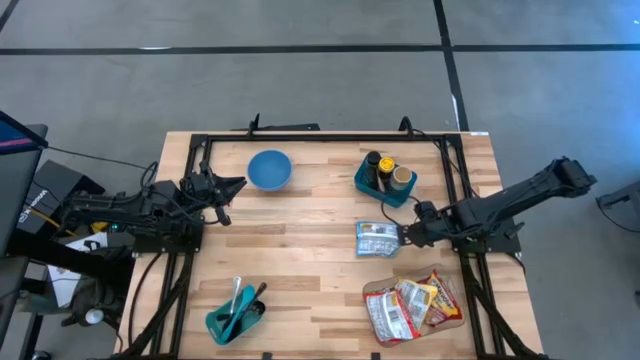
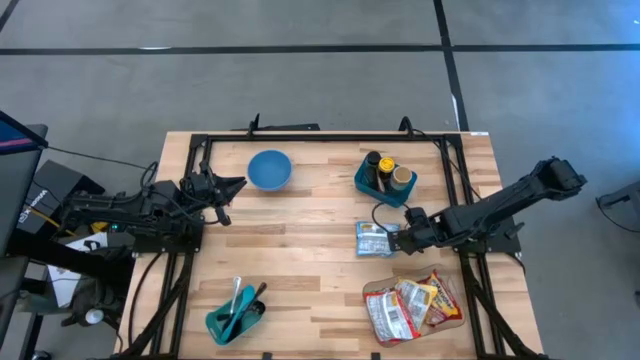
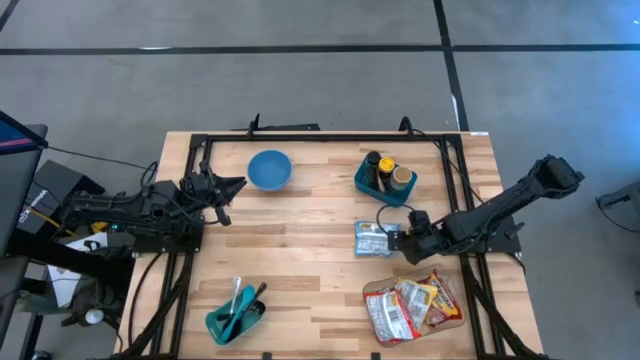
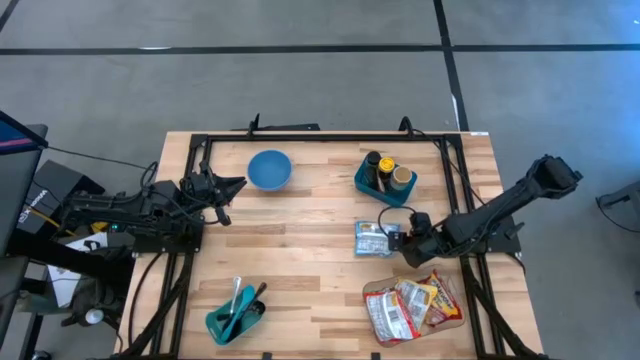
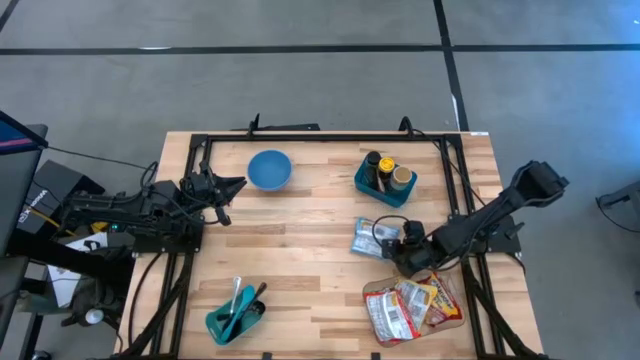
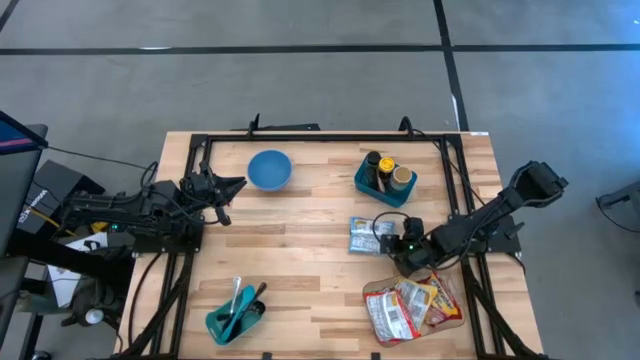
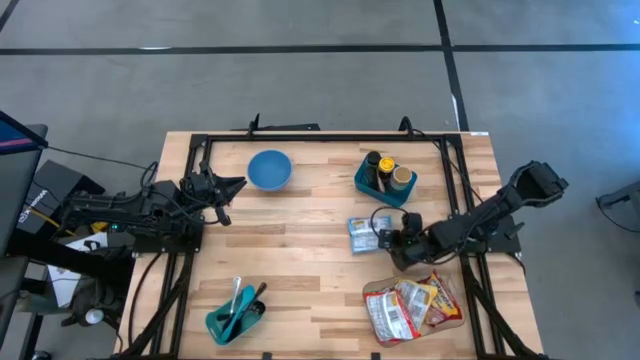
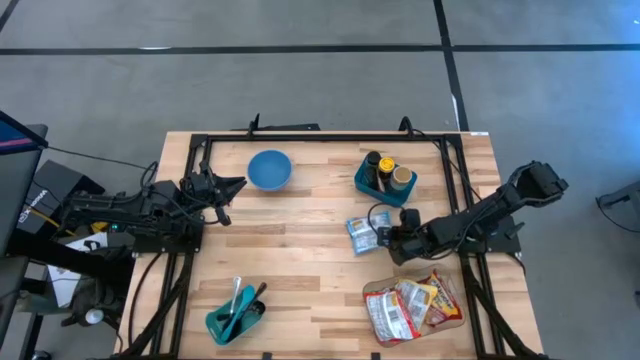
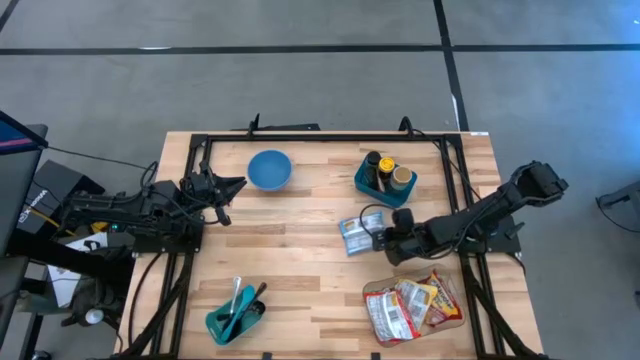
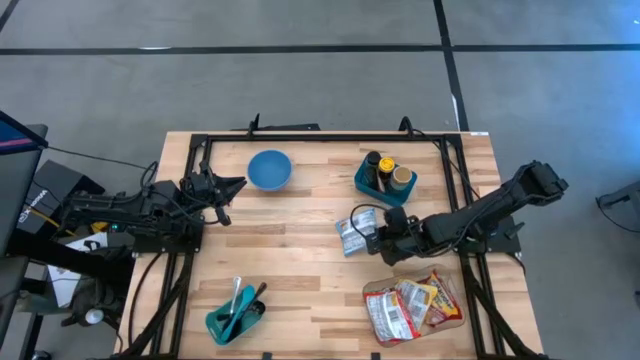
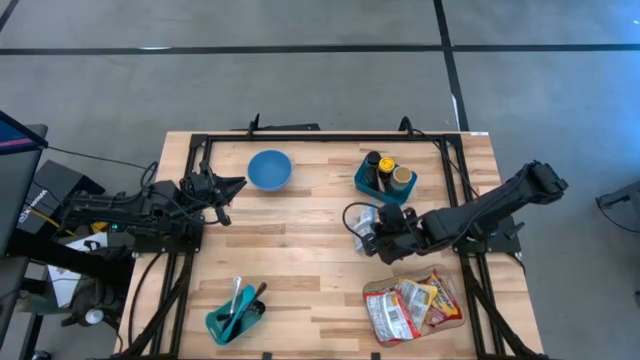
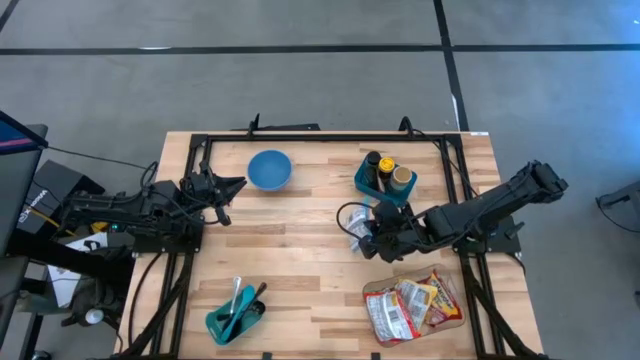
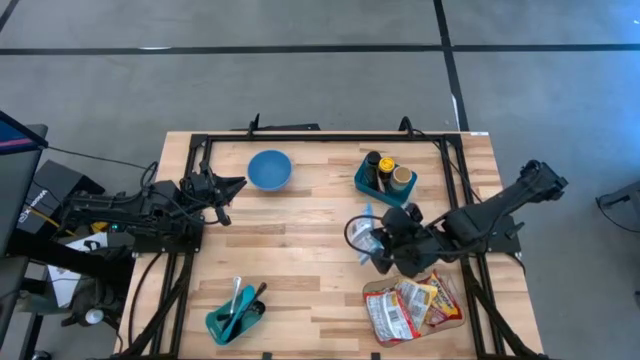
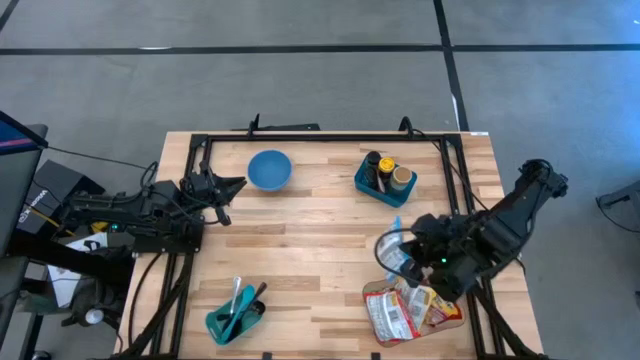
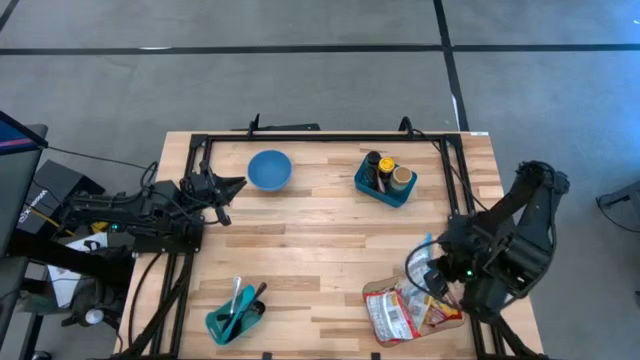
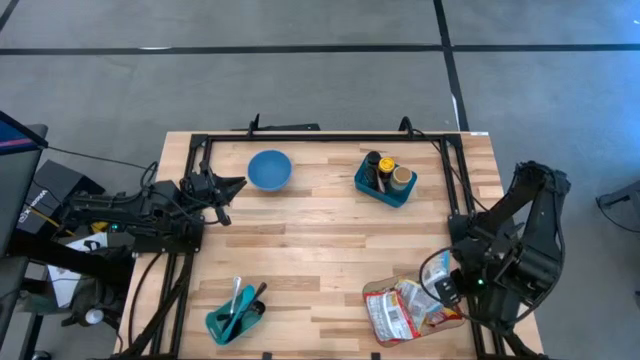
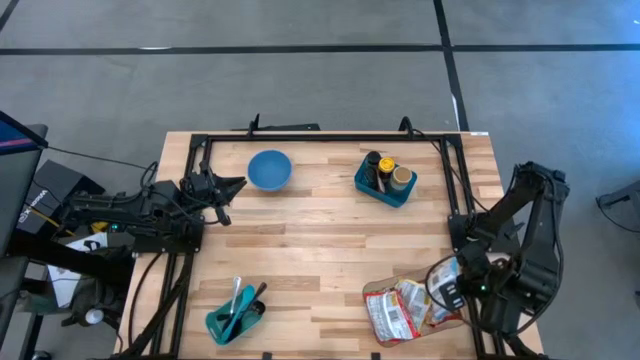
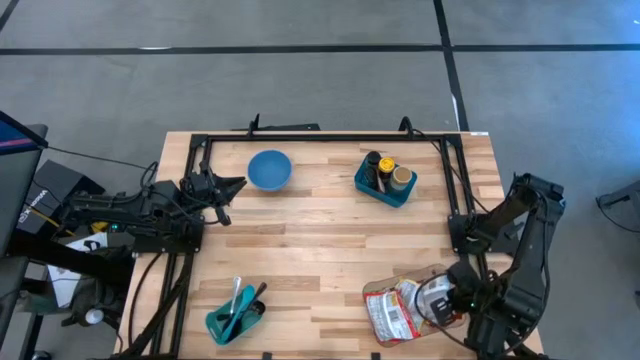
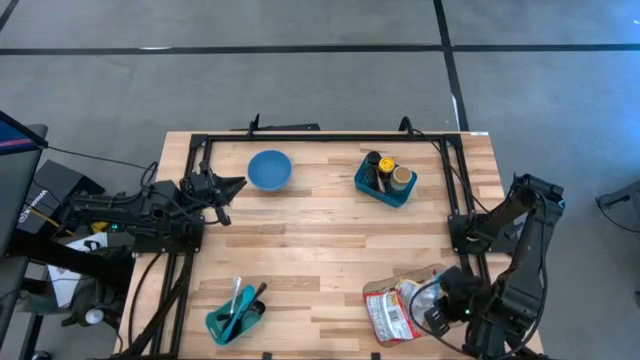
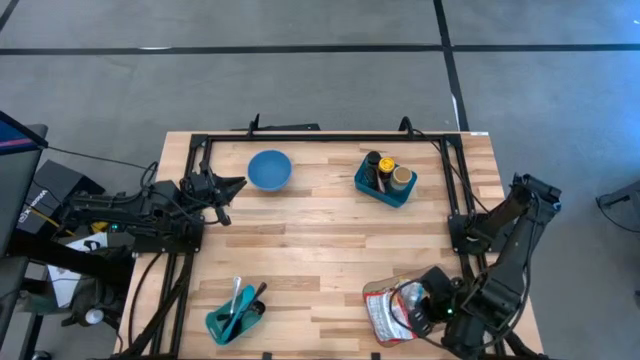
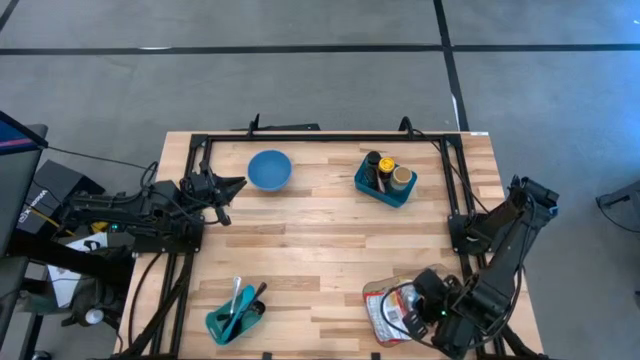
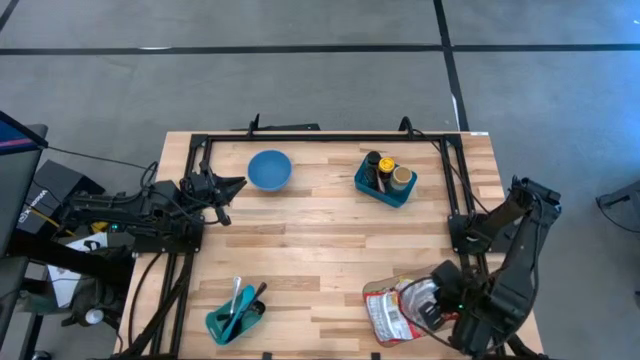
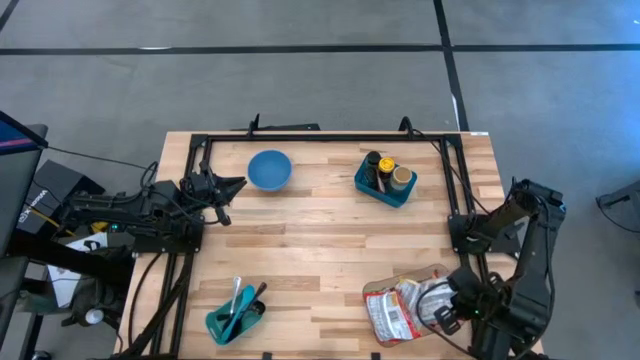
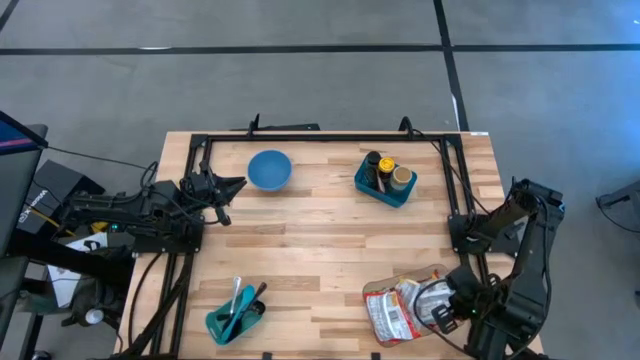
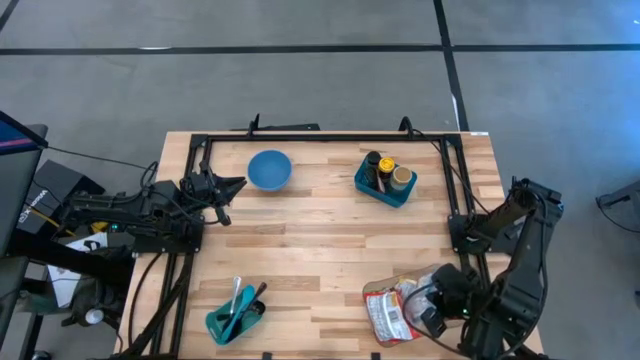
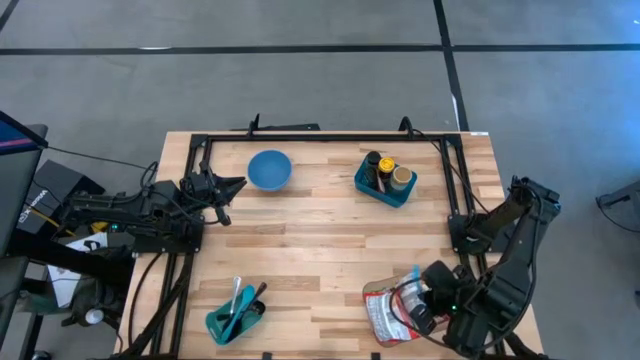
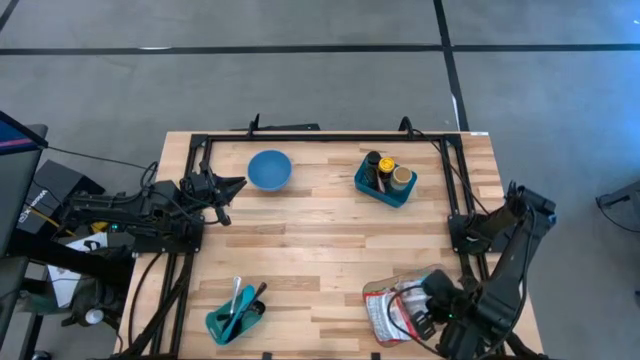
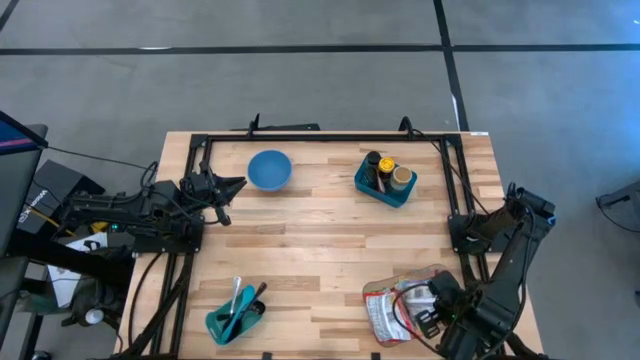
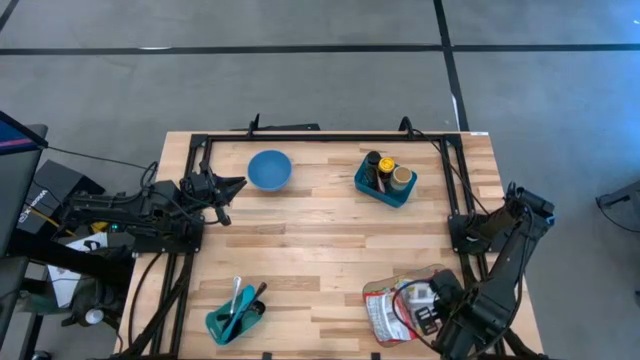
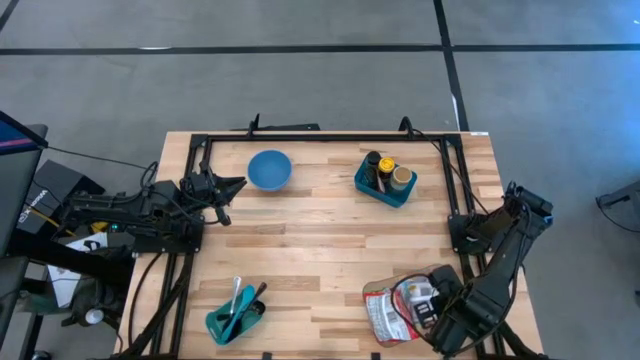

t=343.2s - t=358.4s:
Task: Pick & Place Food Item
Put the blue noodle pack into the transparent bin

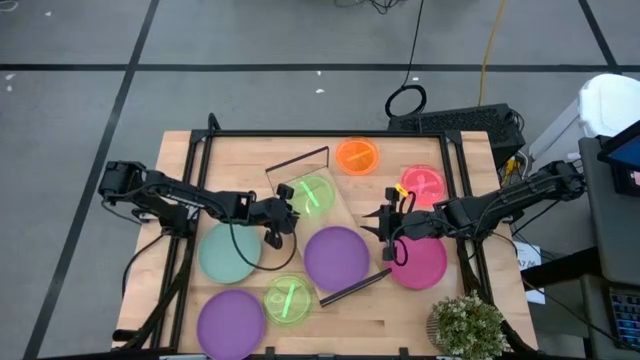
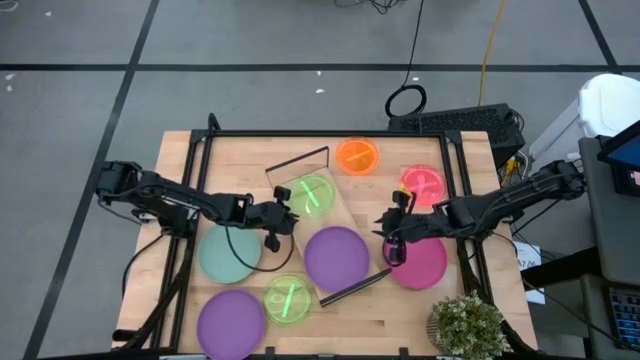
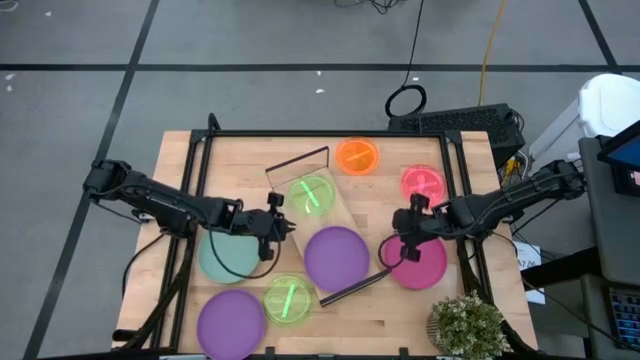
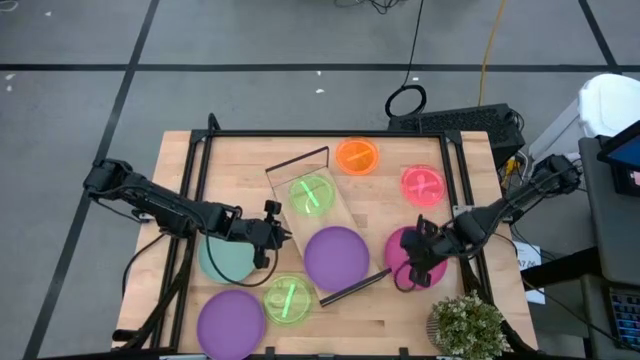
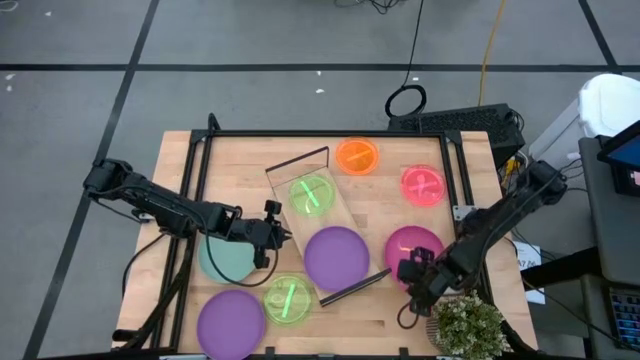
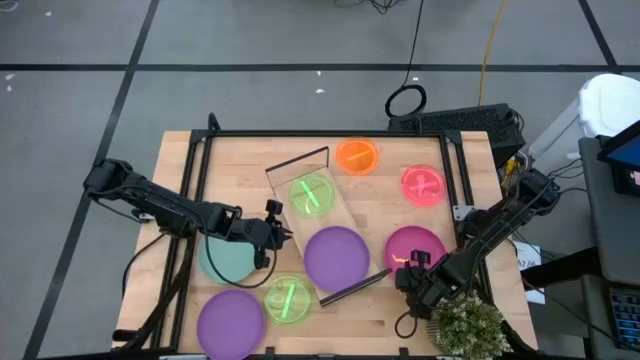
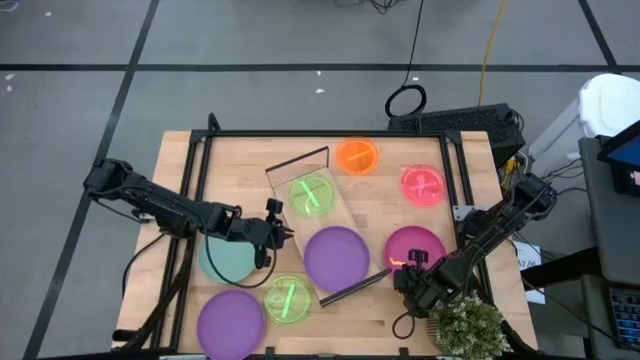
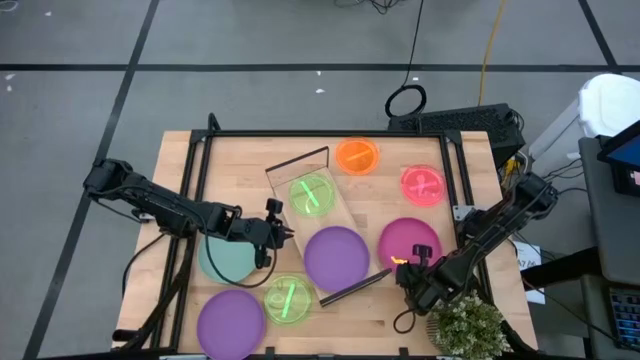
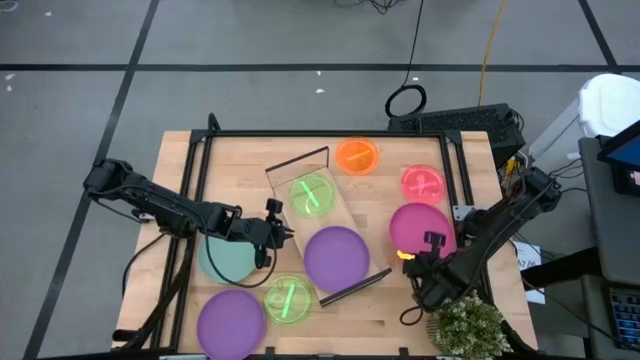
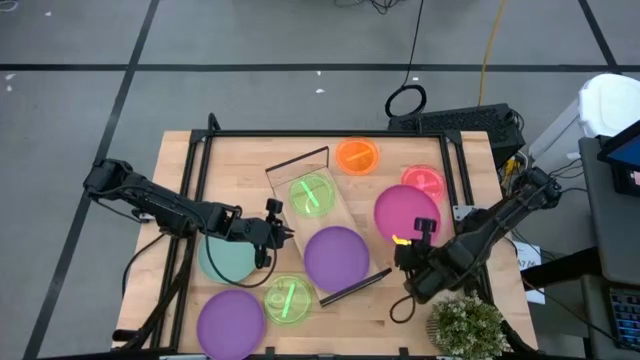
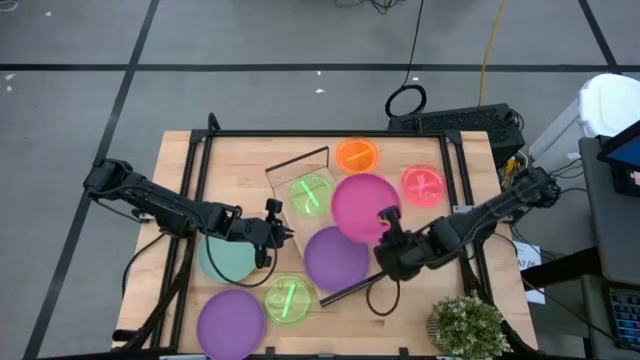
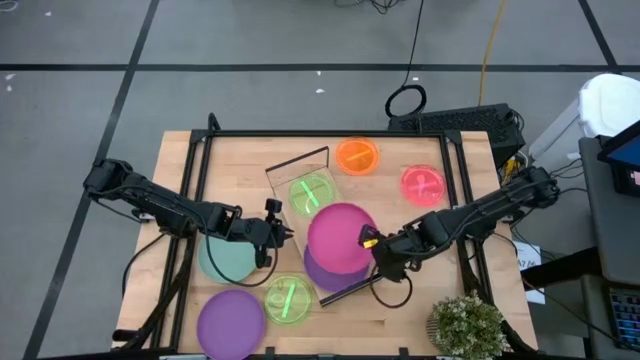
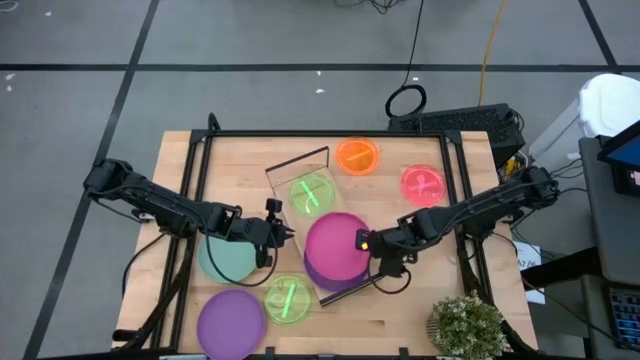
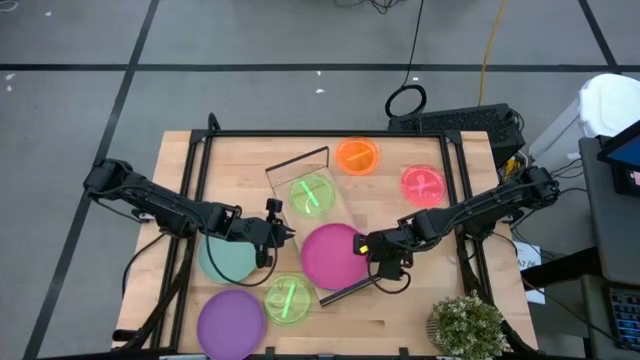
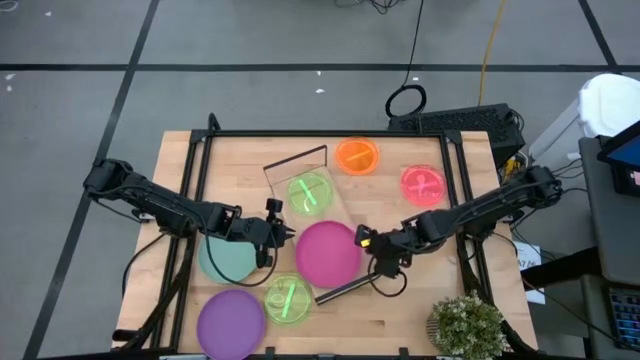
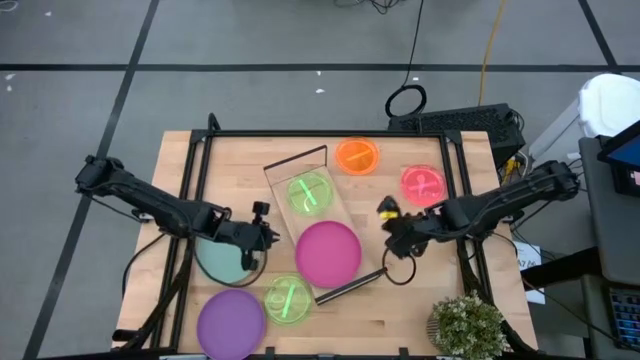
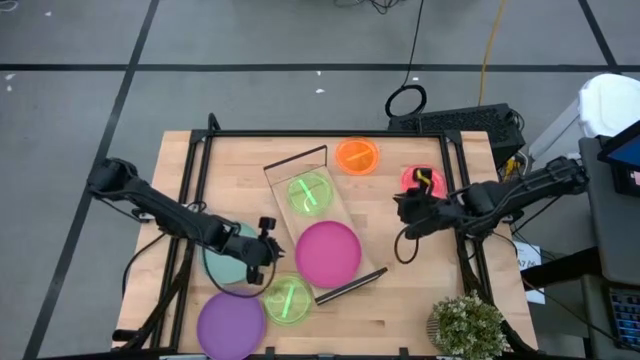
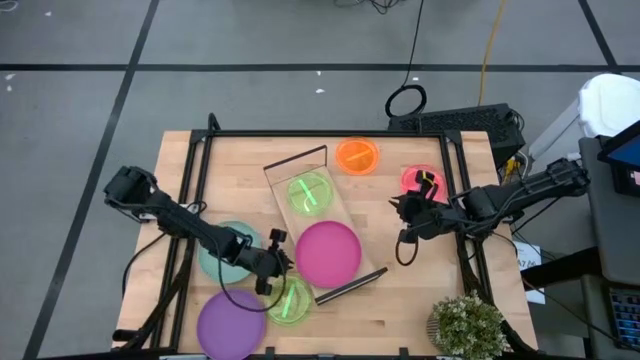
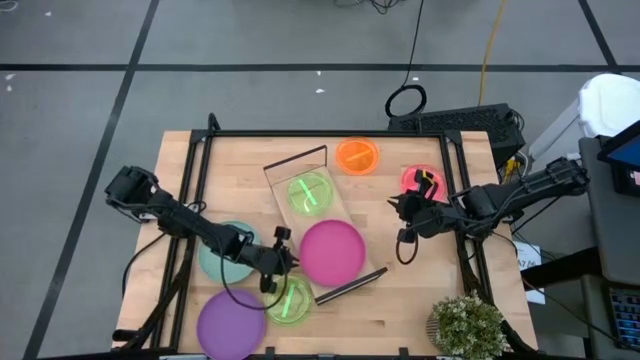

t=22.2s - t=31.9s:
Task: Place and stack plates onto a shelf
Stack the pink plate on the purple plate on the shelf
